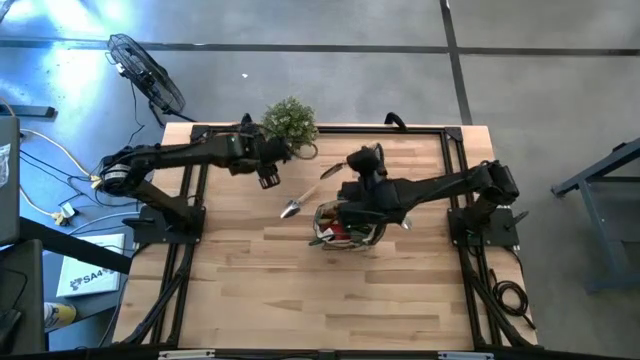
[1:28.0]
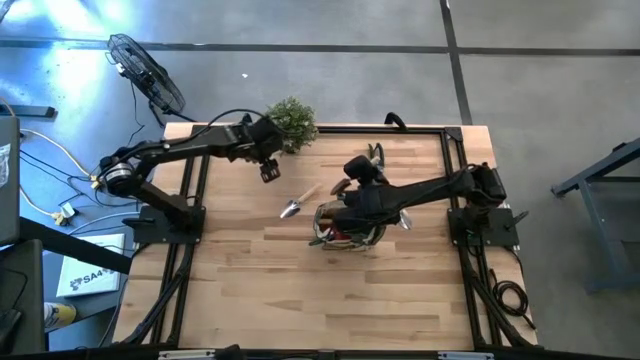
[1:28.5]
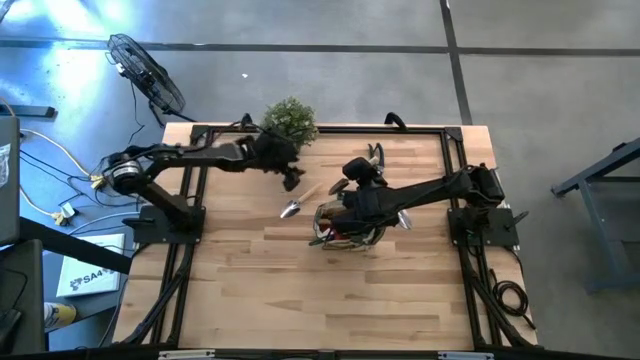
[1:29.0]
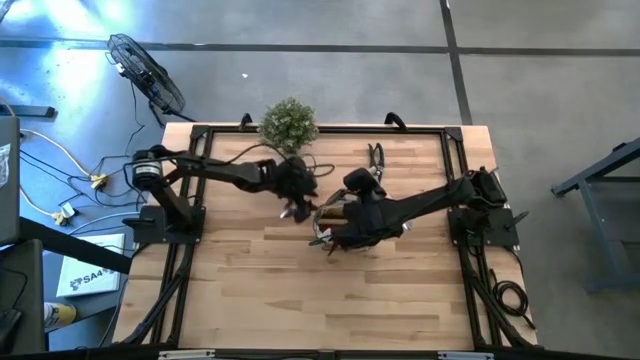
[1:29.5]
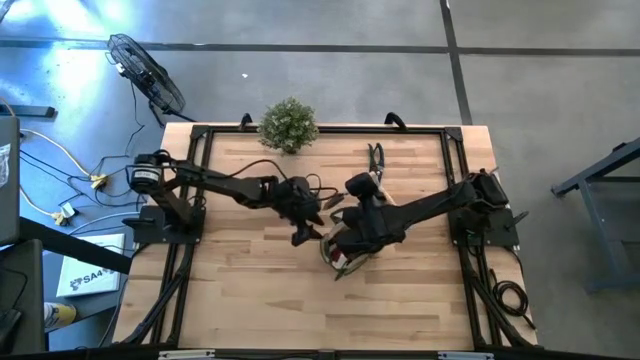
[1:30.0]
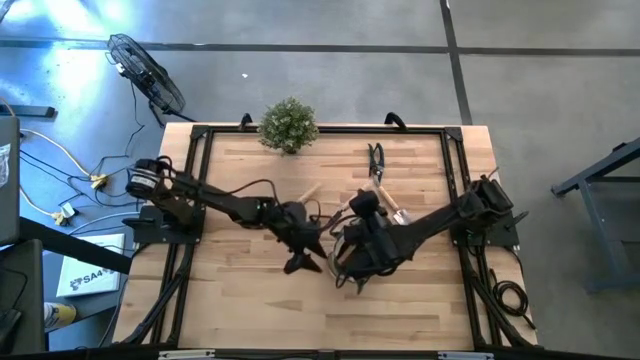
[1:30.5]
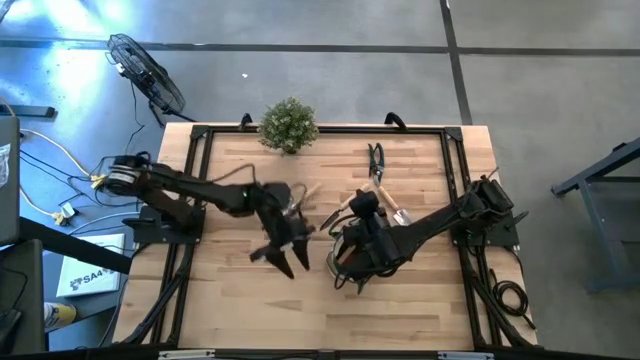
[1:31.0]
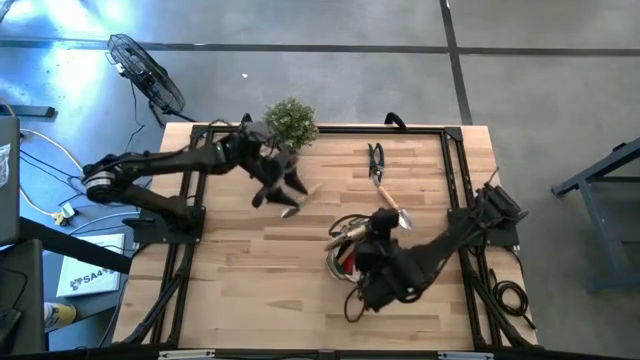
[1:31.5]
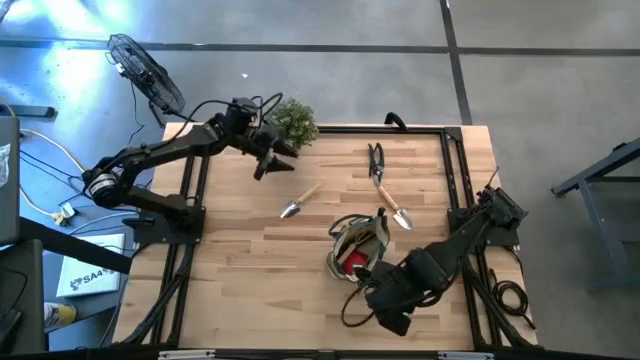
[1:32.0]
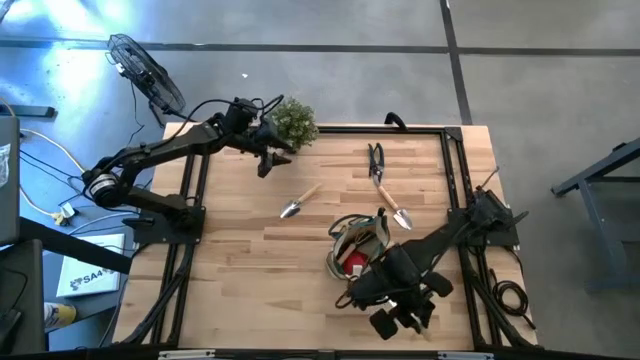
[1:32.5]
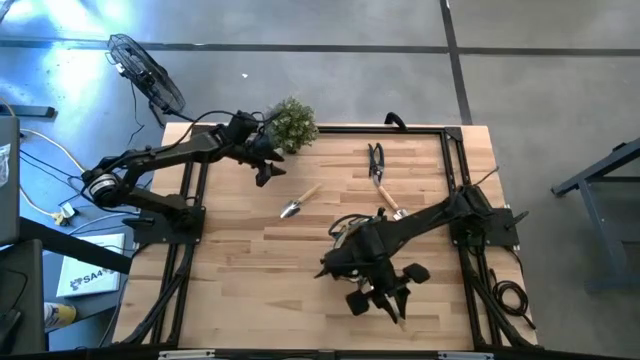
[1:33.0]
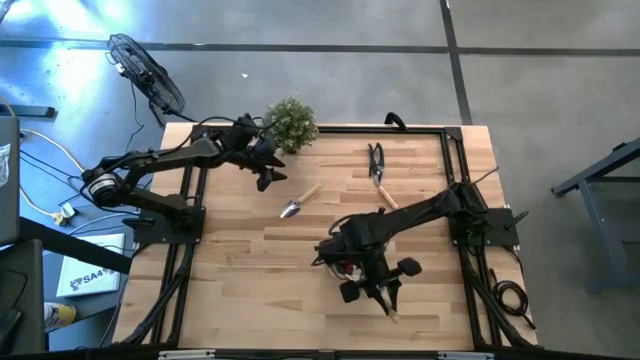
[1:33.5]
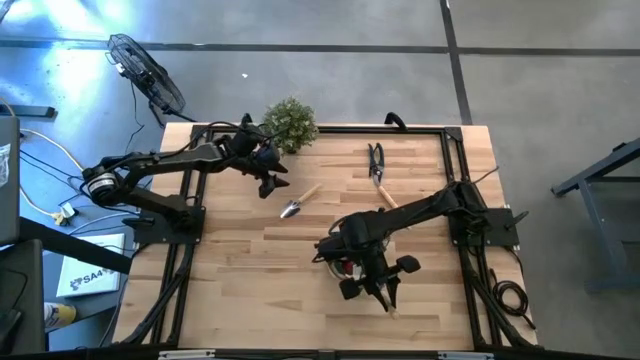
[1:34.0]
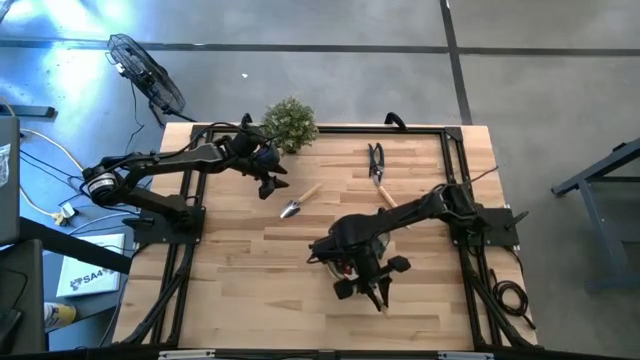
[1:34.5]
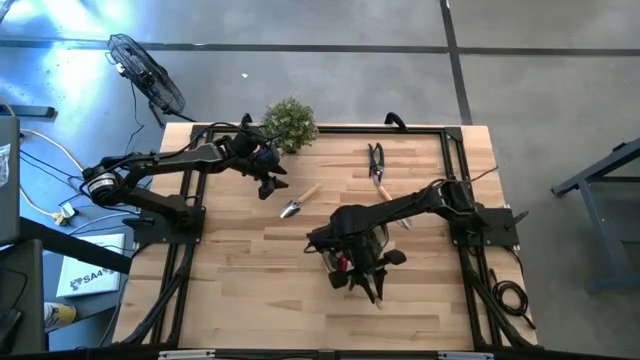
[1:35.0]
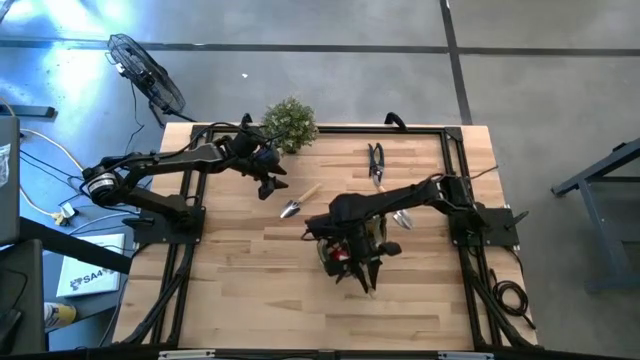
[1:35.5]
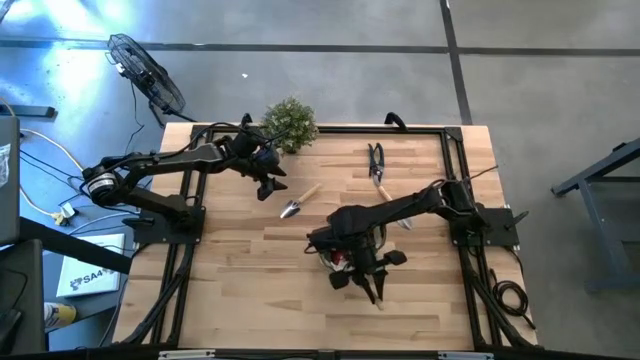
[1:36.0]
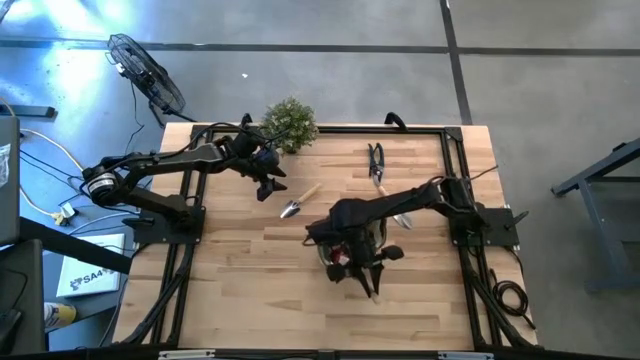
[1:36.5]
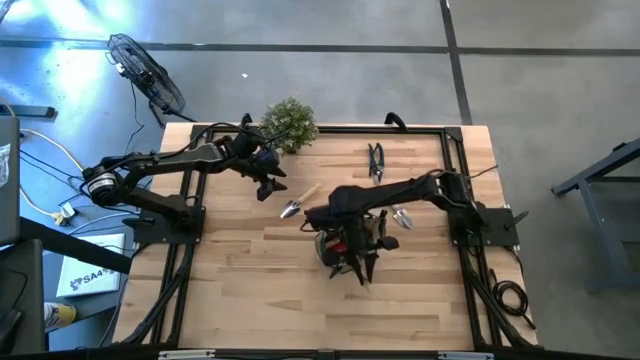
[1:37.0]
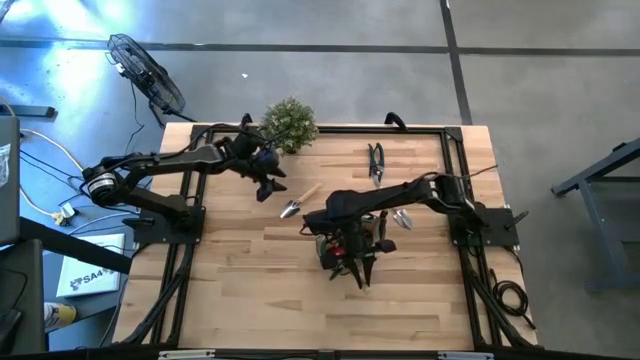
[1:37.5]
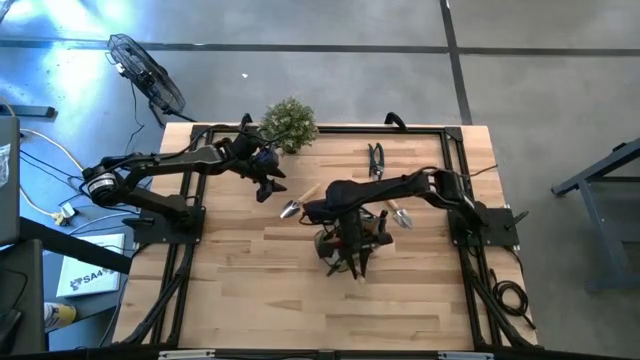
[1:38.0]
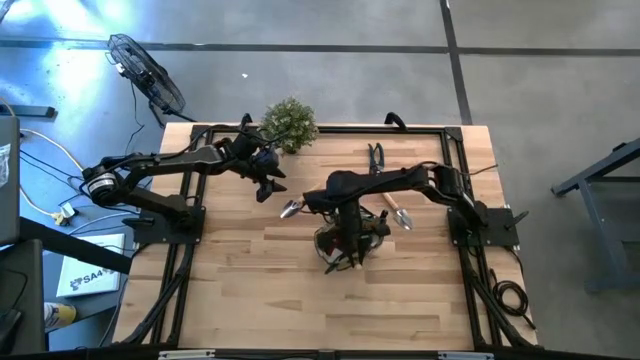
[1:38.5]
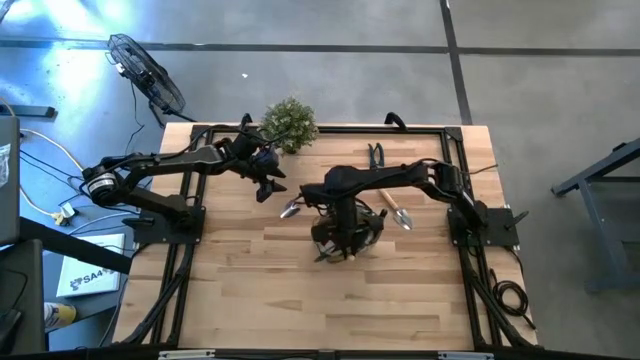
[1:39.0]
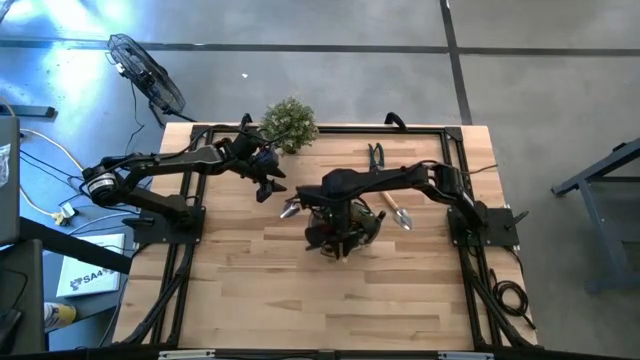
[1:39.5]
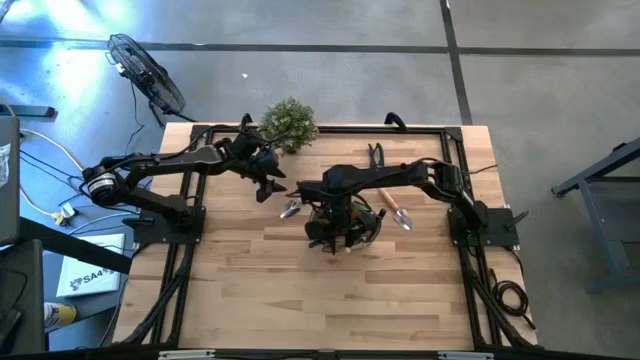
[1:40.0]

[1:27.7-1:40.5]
Task: Pick & Place Garden tools in Gardening bag
Put the bottom right brown trowel into the green bag

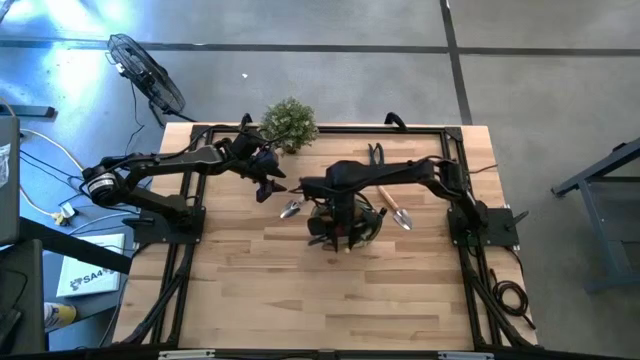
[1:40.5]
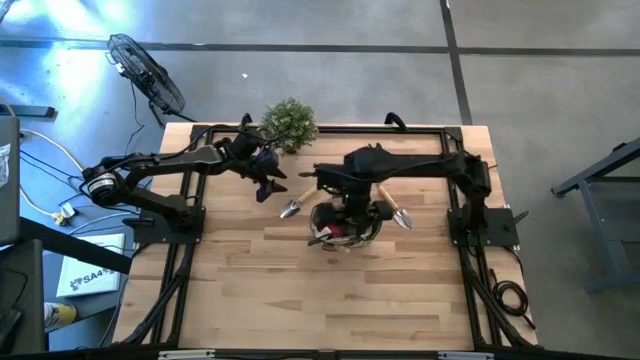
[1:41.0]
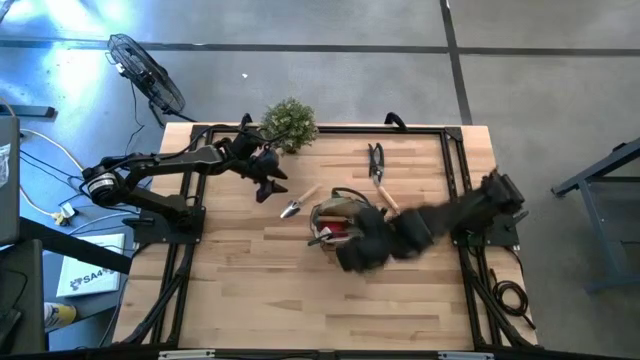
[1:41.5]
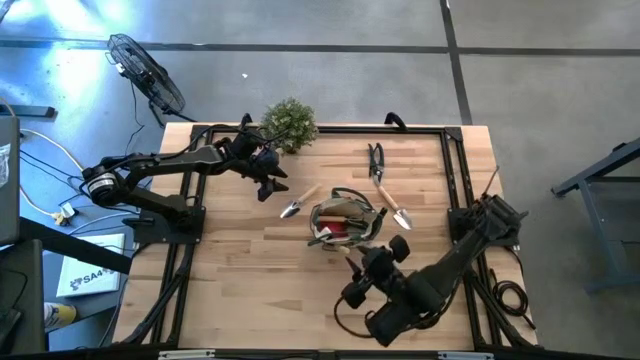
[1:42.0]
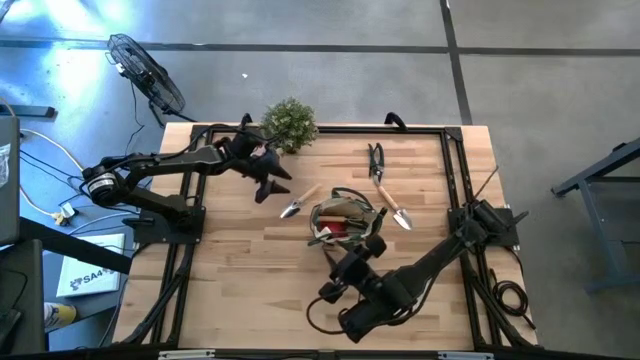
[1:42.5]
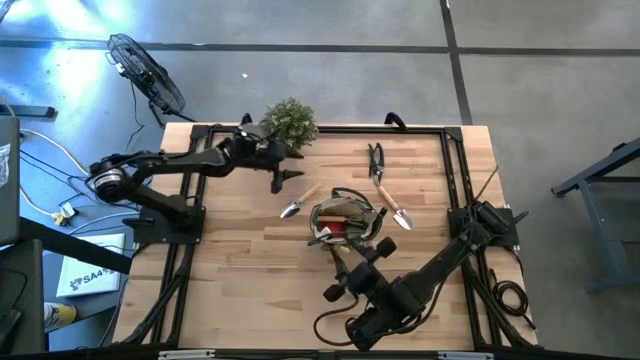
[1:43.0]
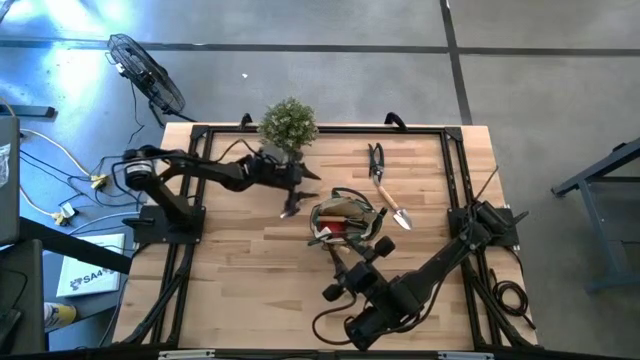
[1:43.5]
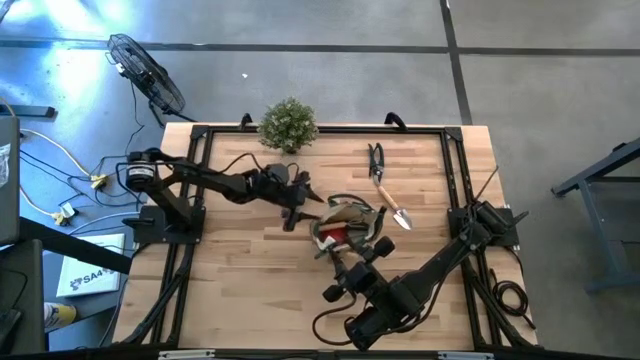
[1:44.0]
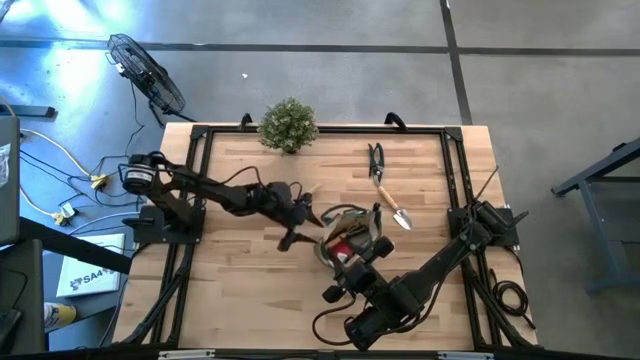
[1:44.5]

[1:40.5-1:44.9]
Adjust the green bag

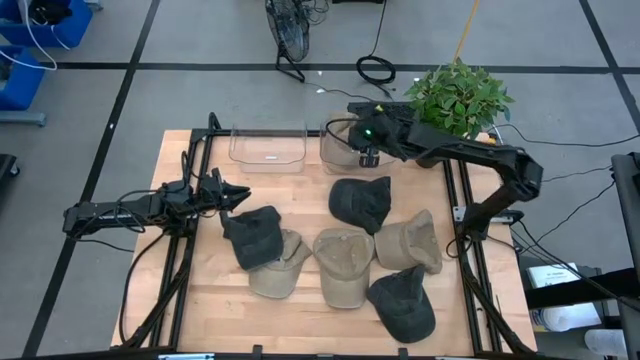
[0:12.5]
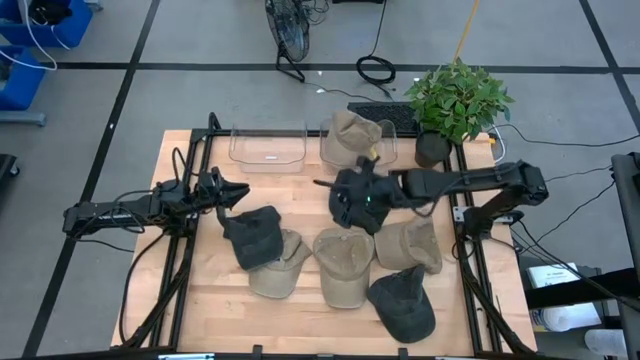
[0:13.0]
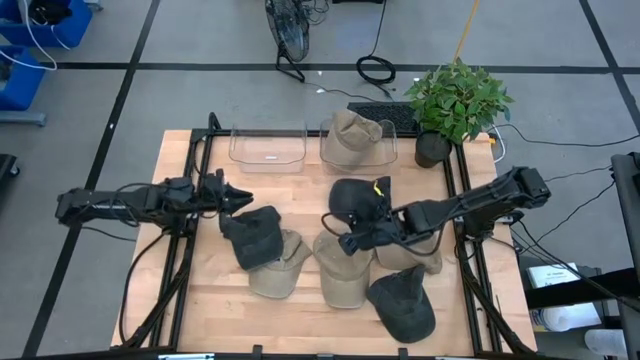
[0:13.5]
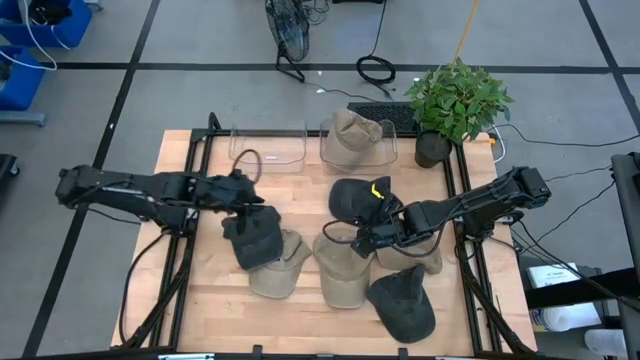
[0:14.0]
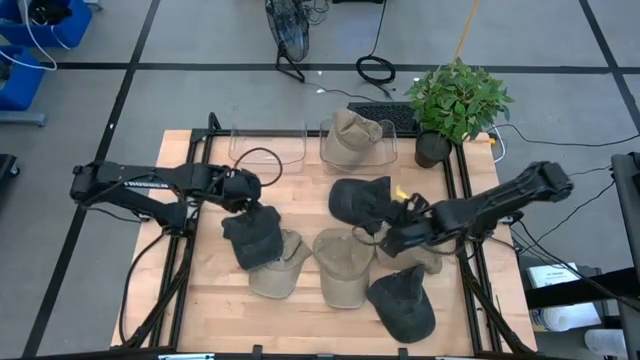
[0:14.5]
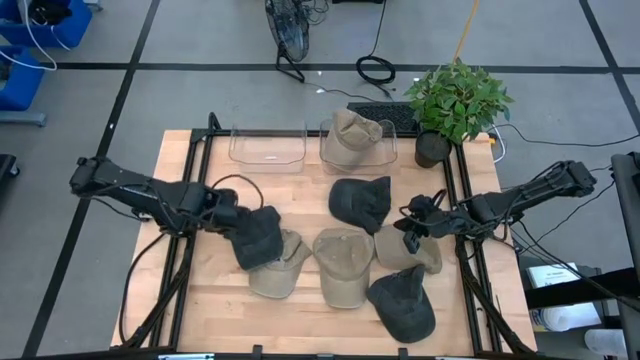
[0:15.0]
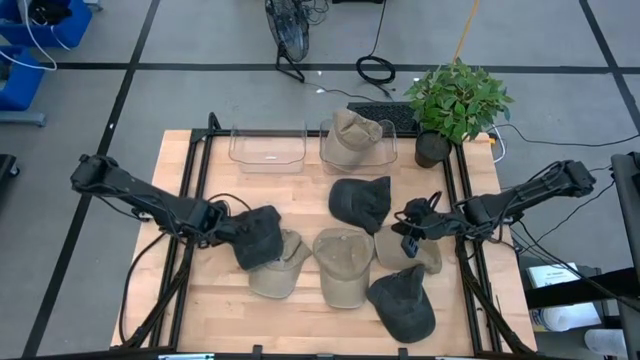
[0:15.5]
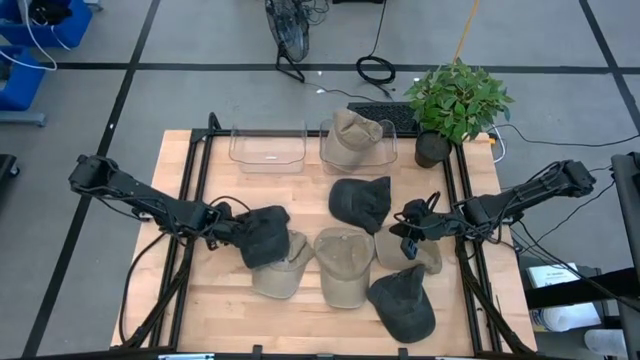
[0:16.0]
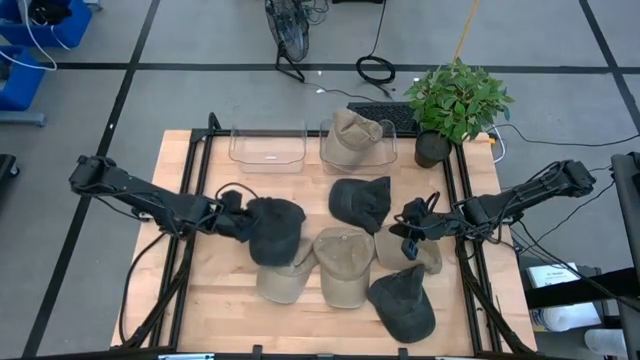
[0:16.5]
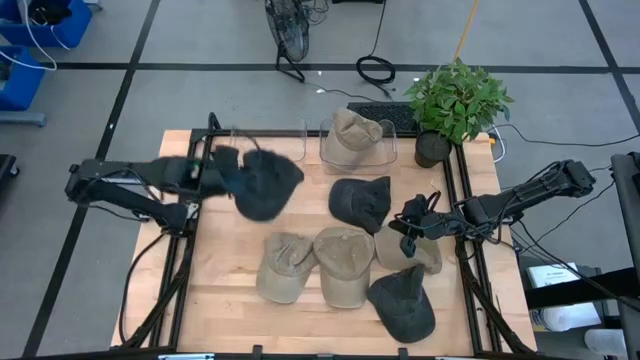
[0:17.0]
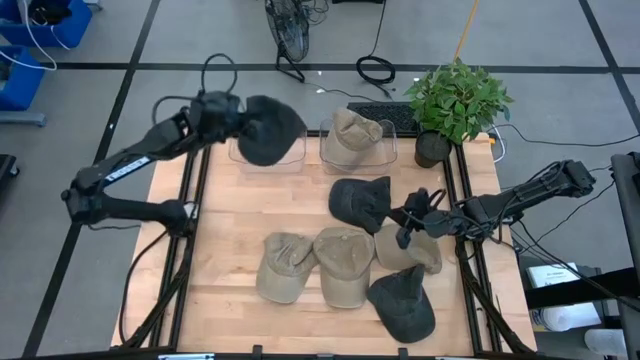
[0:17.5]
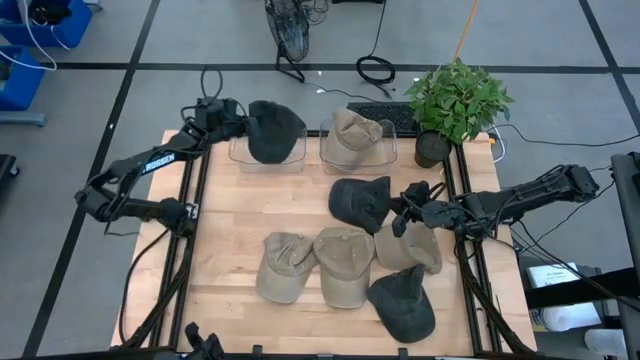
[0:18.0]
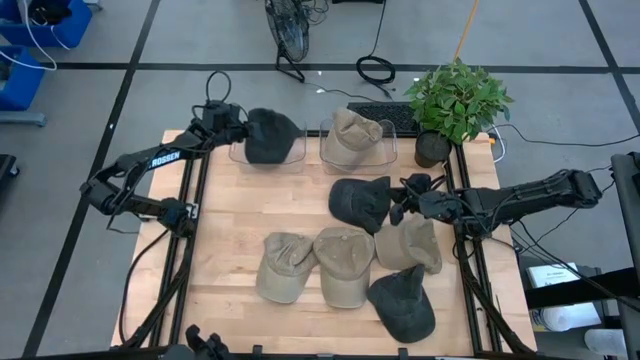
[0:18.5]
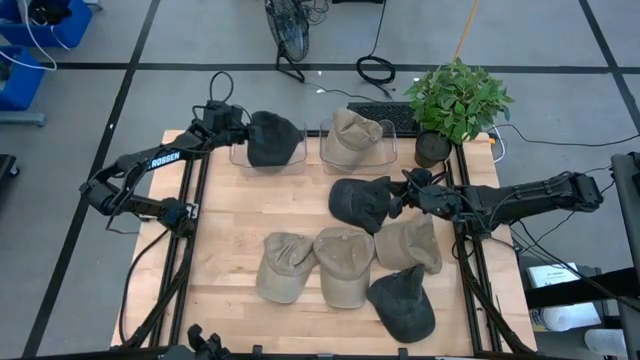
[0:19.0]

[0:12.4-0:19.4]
Task: Pick & Place hat
Put the black cap into the left transparent bin
